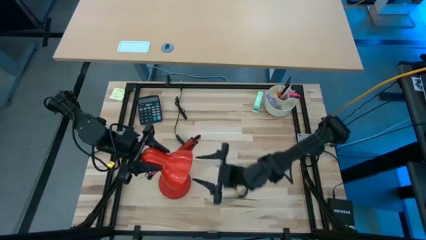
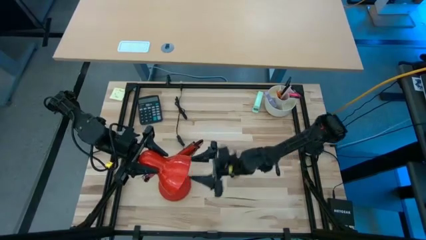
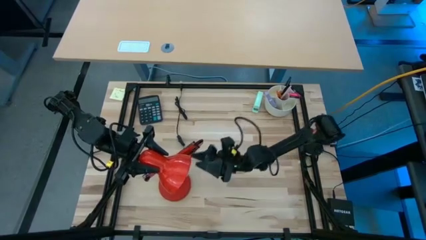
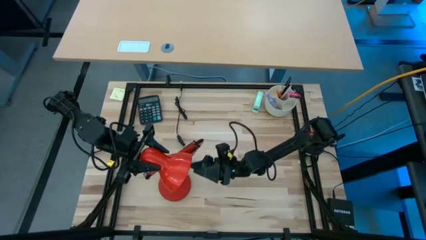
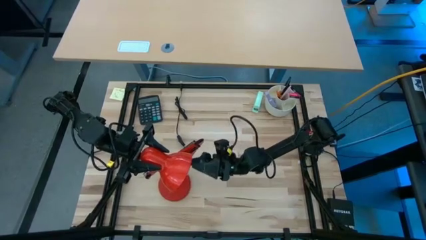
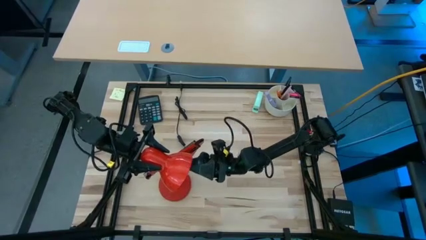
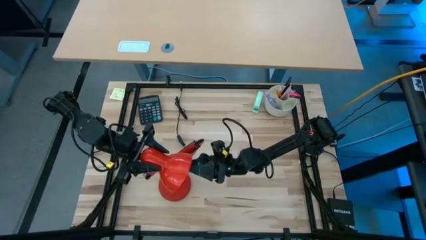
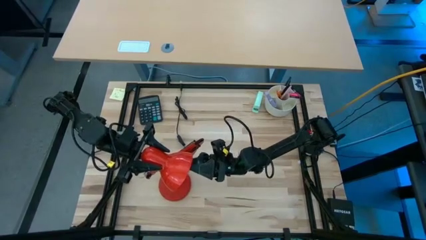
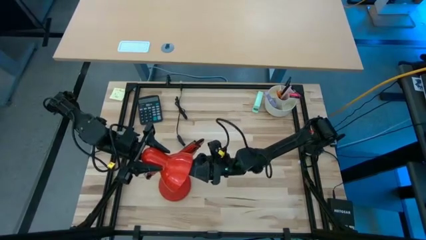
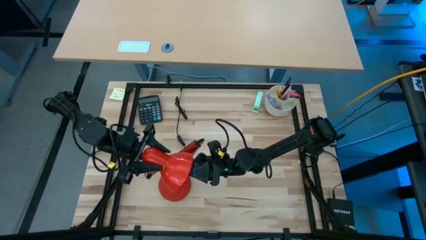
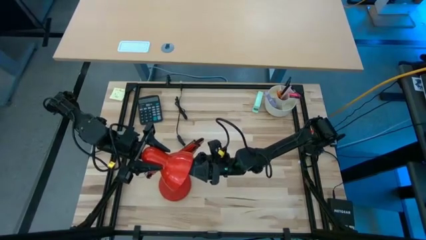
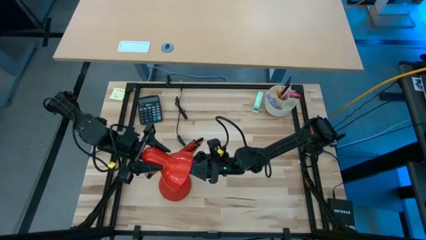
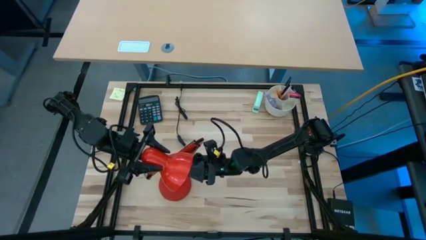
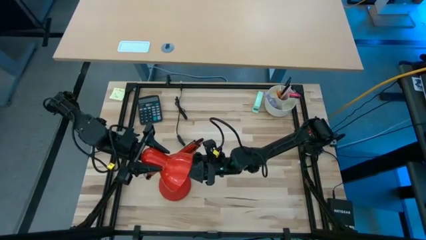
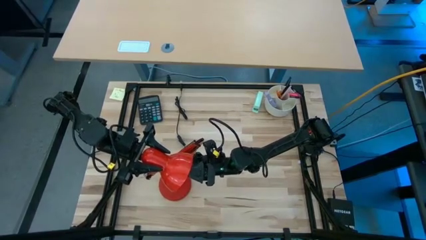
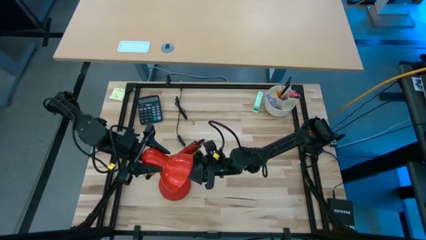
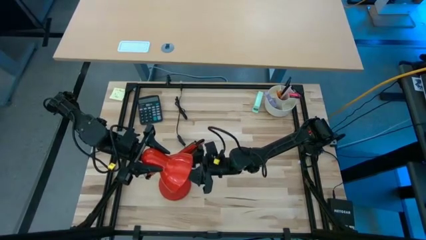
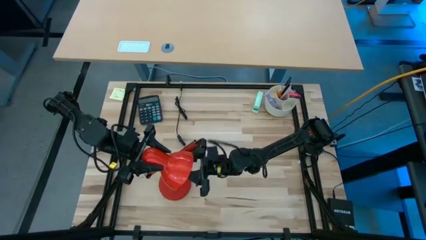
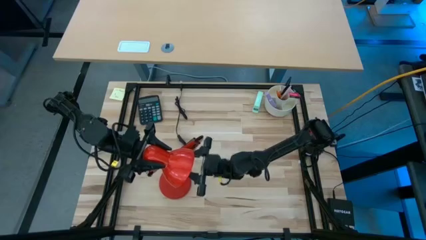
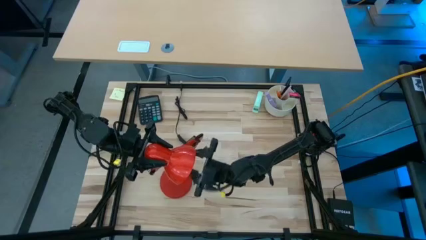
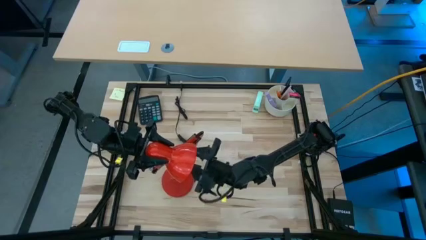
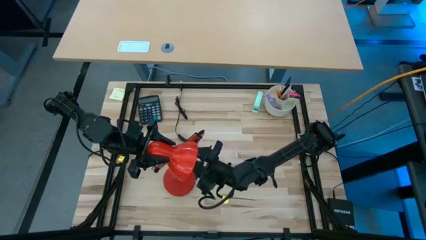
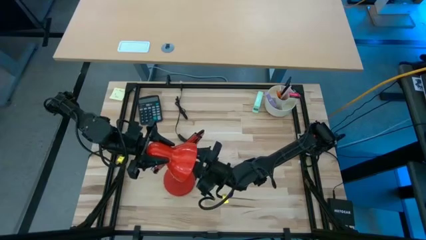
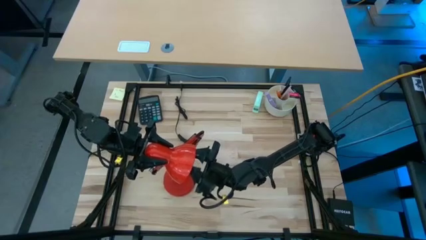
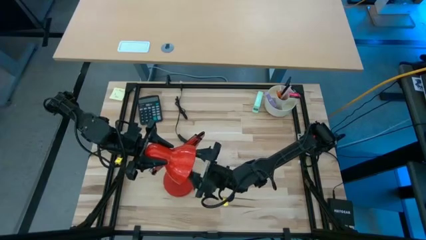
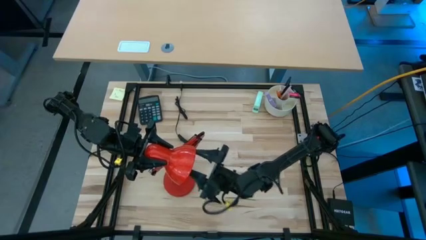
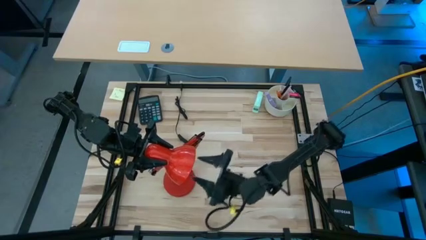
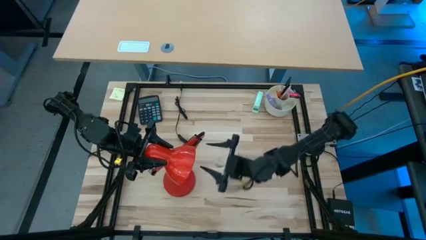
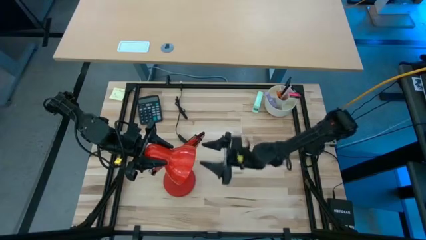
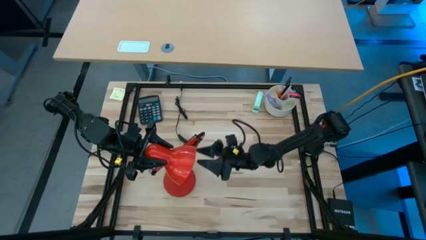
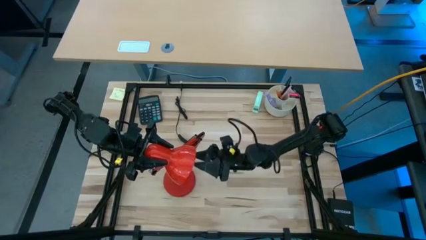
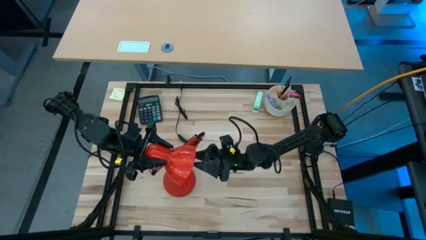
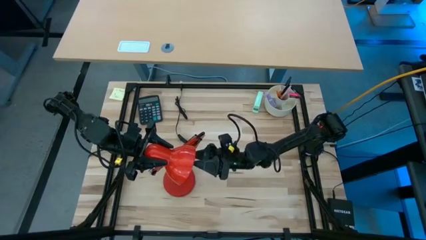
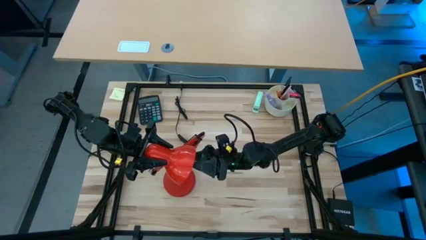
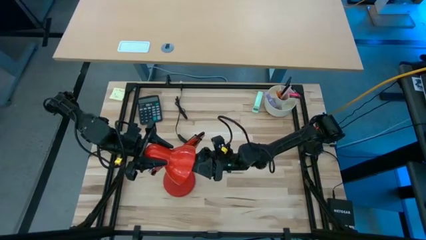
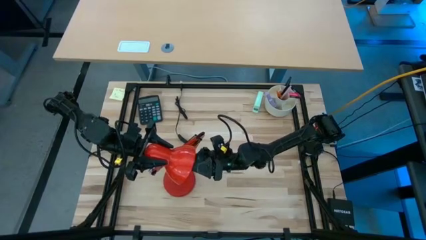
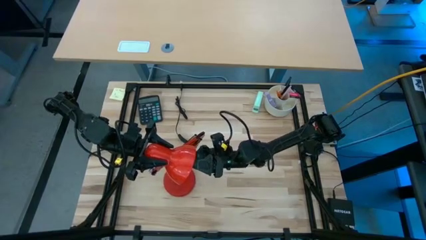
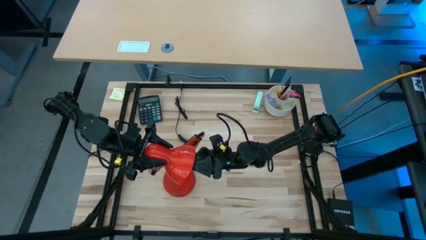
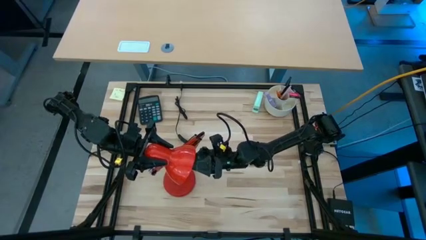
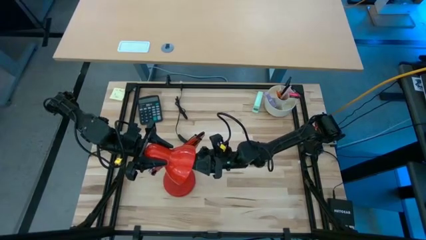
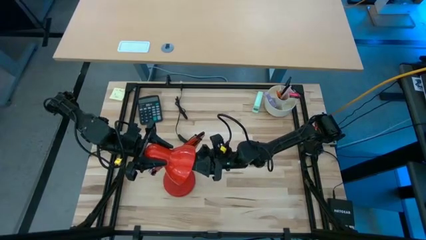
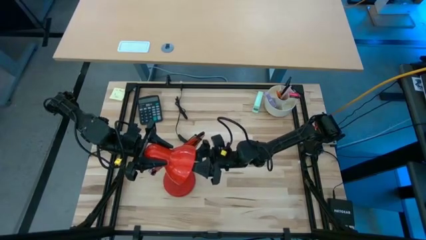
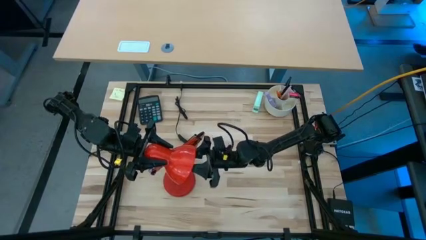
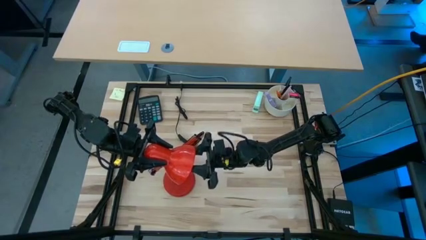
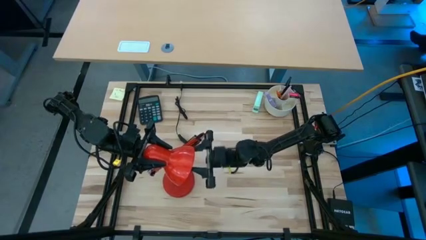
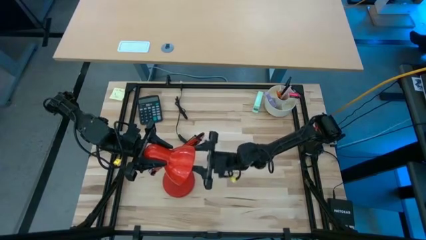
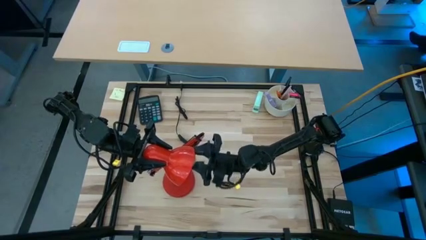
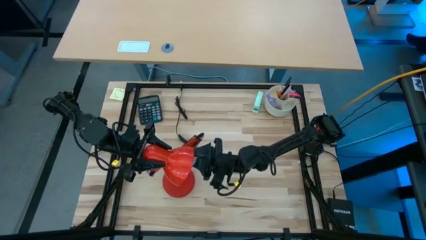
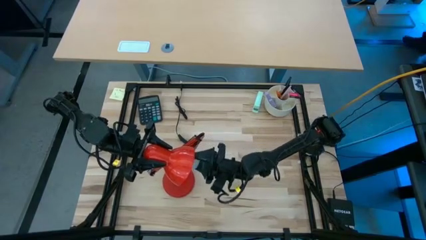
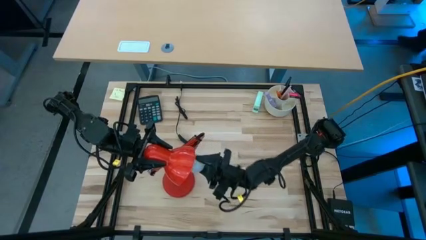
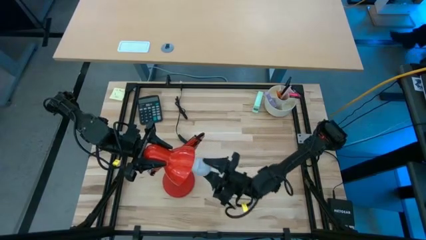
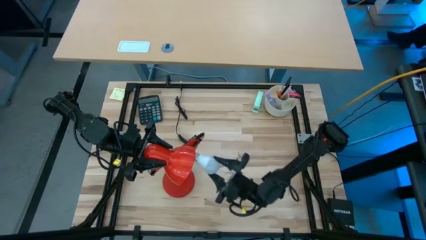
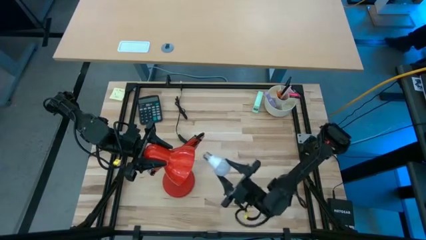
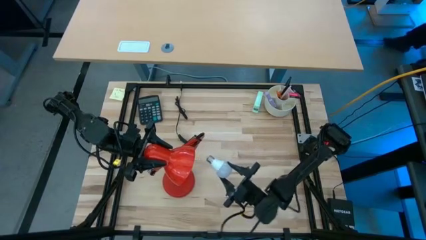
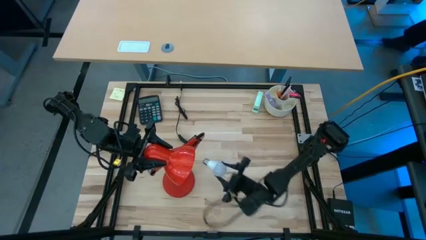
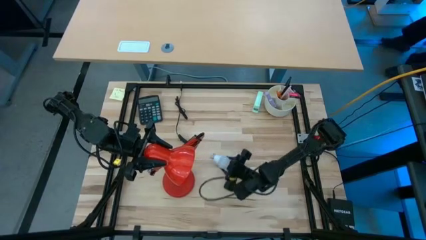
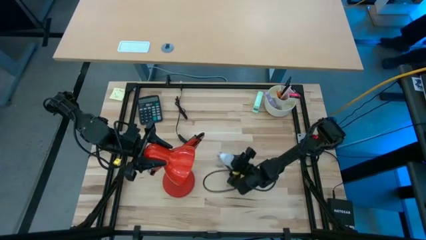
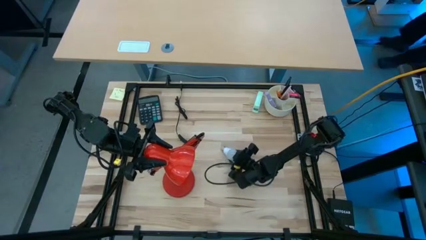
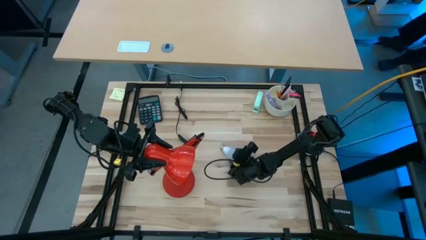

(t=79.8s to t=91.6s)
Task: Screw lightbulb
Remove the light bulb from orange desk lamp

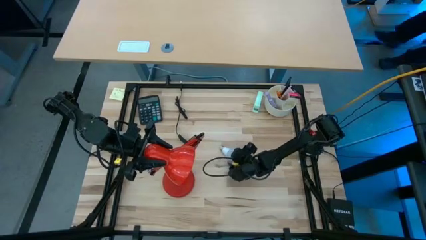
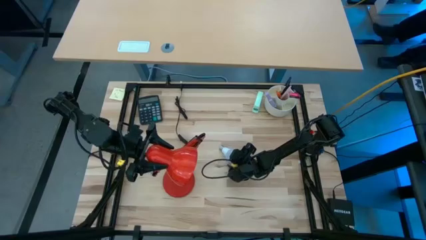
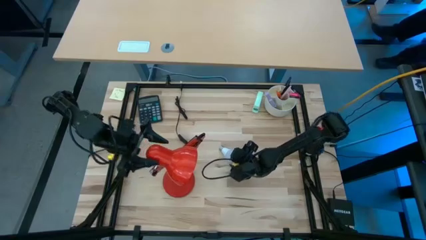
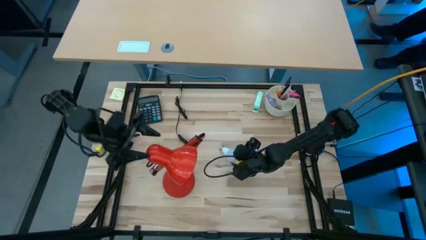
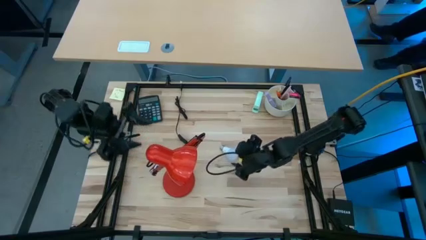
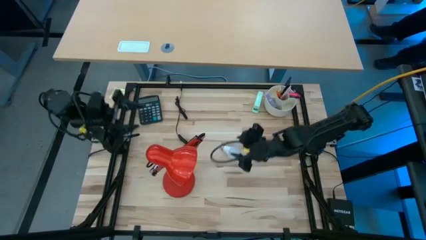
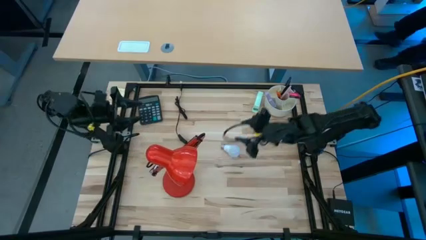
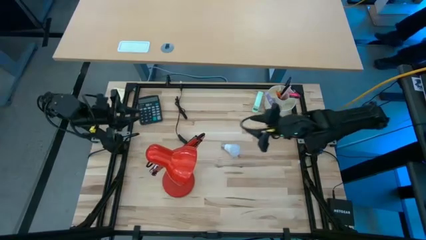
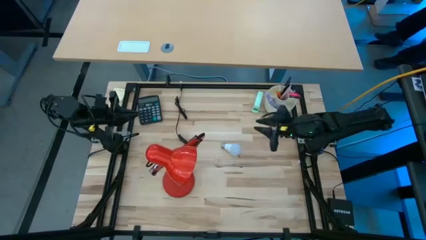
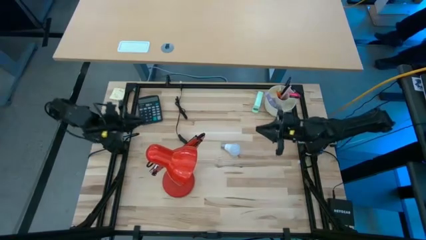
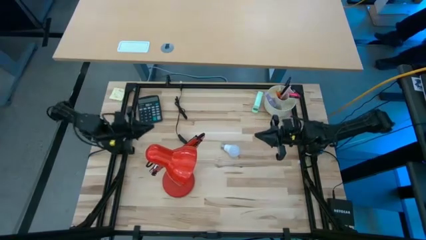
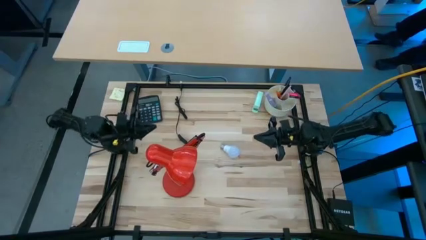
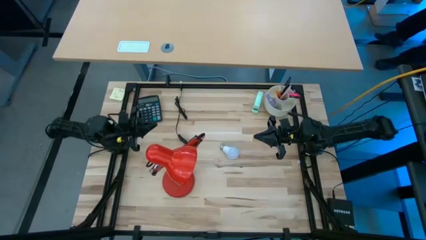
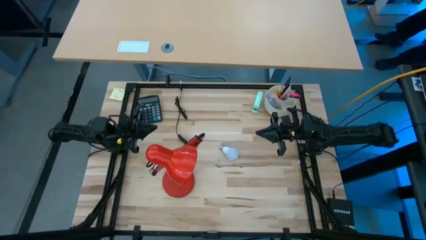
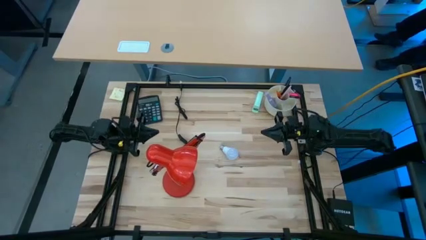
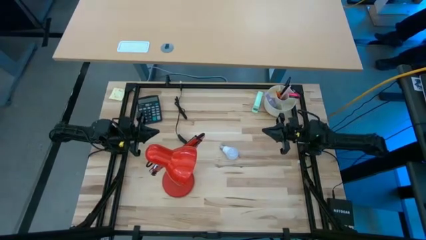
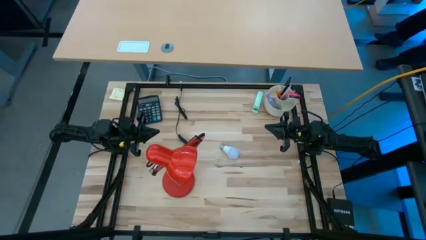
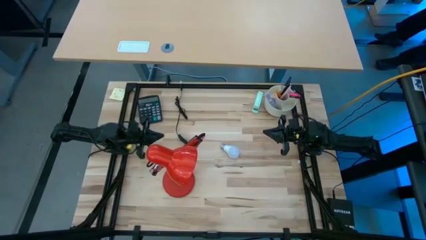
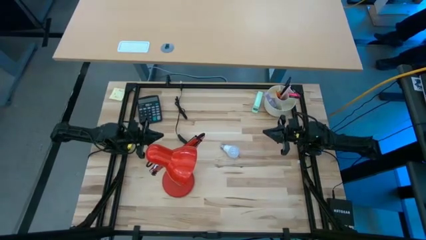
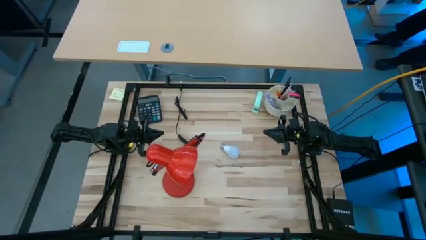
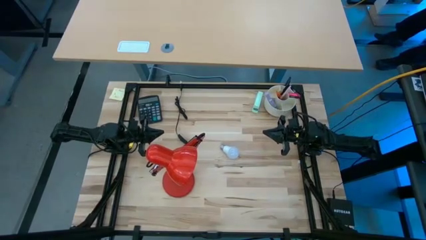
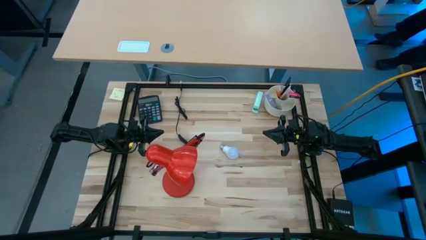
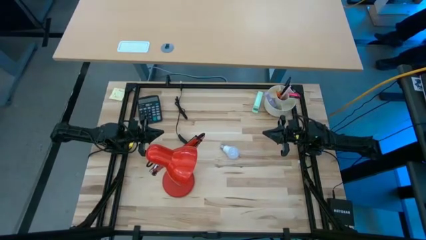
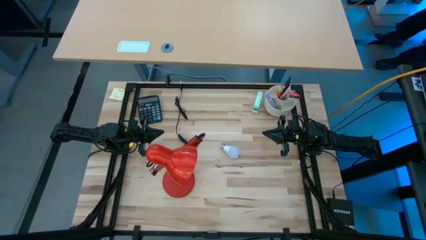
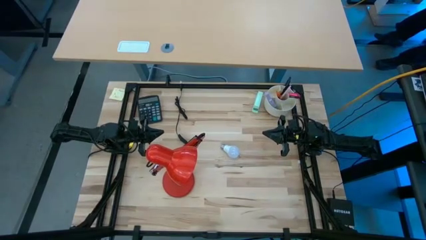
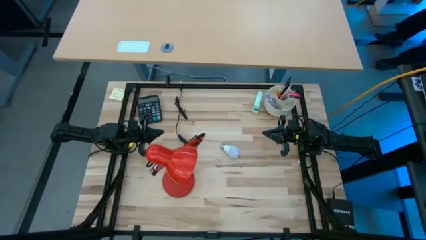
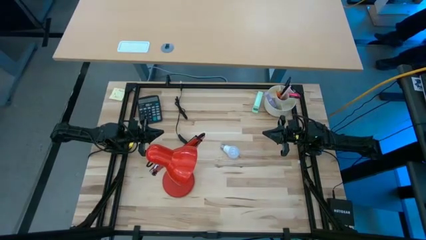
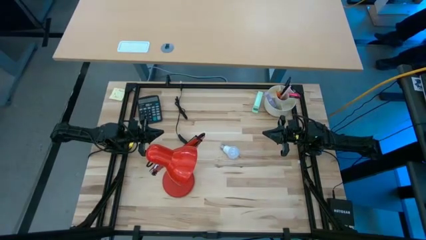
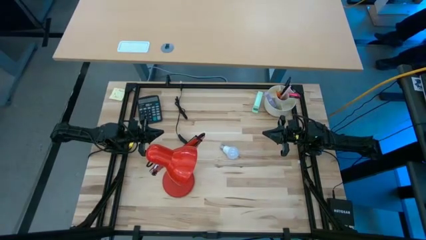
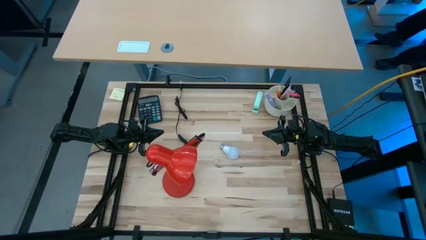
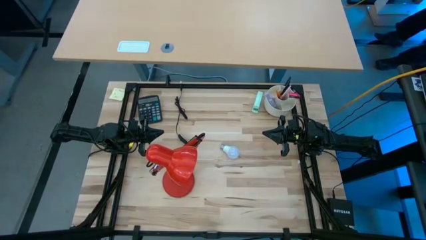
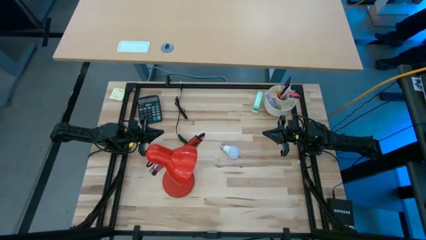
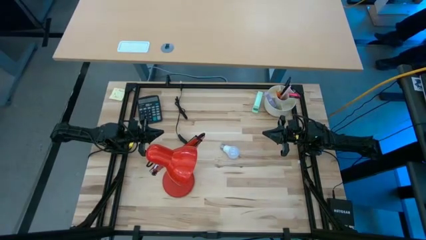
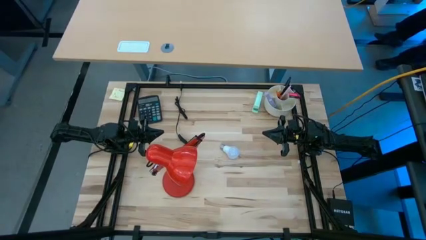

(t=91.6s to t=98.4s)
Return to Home Position
